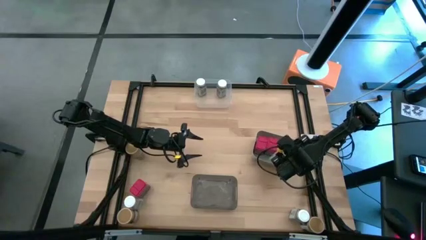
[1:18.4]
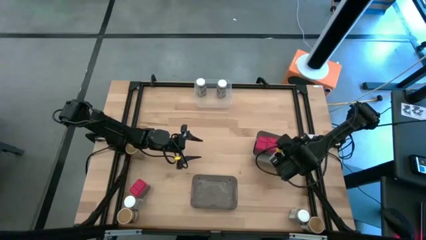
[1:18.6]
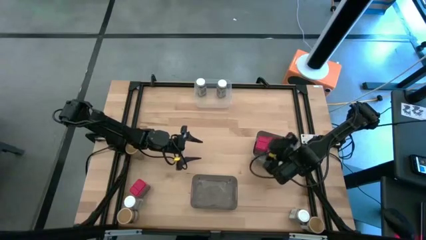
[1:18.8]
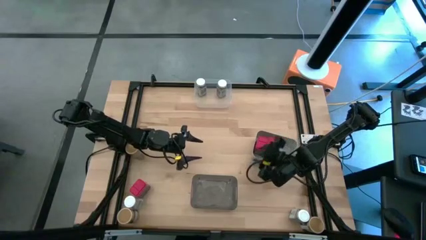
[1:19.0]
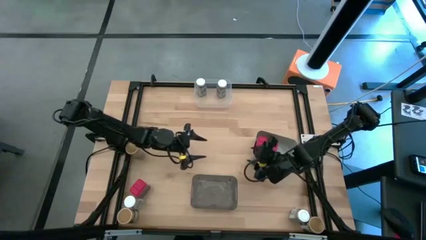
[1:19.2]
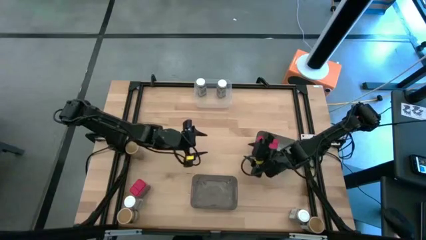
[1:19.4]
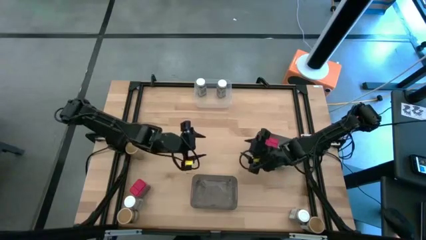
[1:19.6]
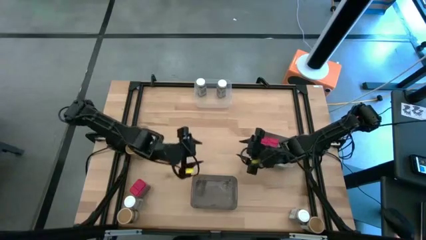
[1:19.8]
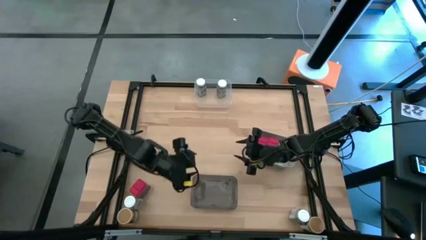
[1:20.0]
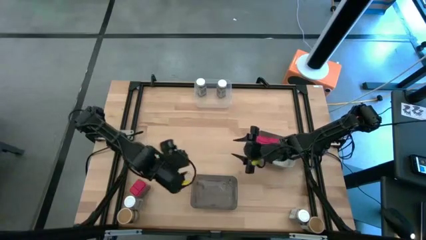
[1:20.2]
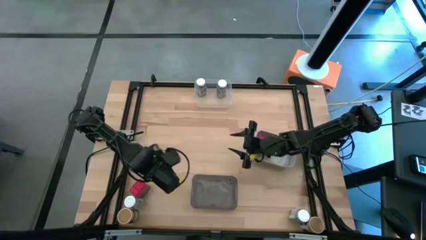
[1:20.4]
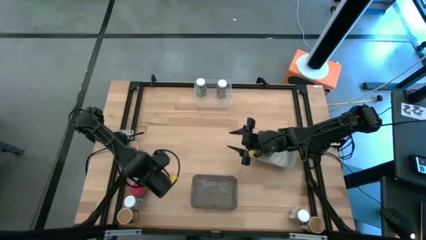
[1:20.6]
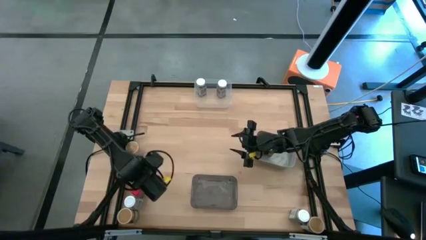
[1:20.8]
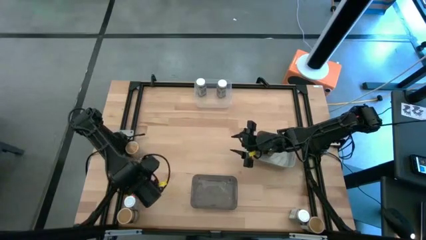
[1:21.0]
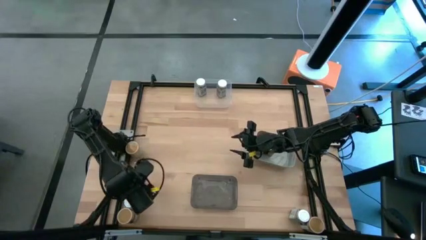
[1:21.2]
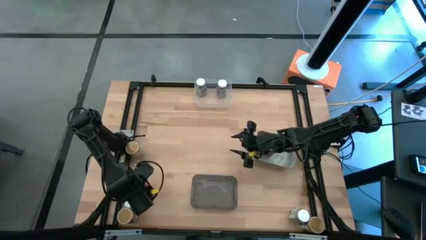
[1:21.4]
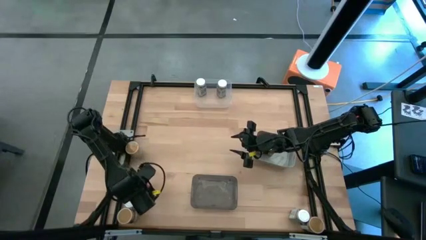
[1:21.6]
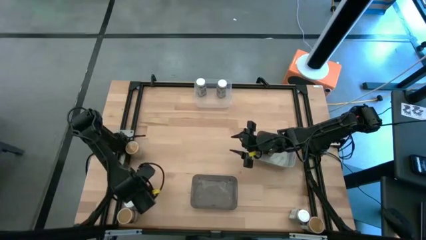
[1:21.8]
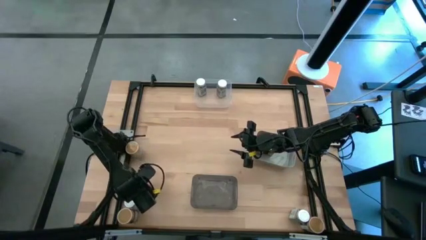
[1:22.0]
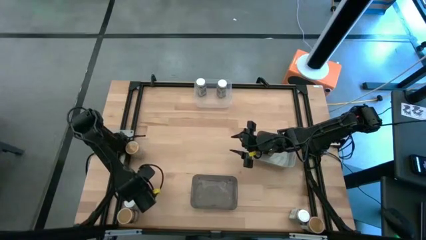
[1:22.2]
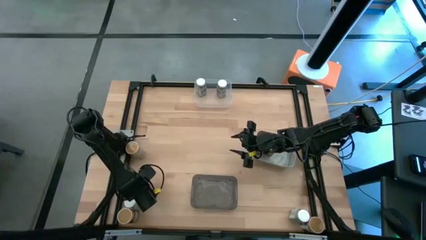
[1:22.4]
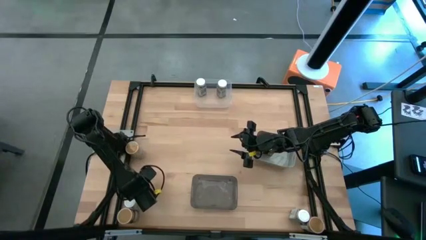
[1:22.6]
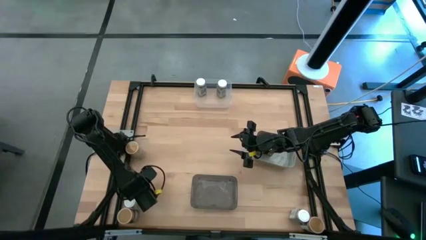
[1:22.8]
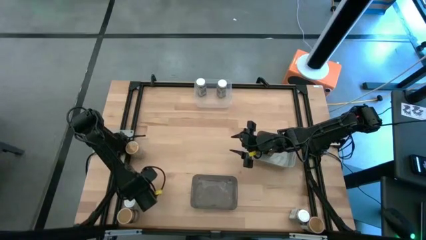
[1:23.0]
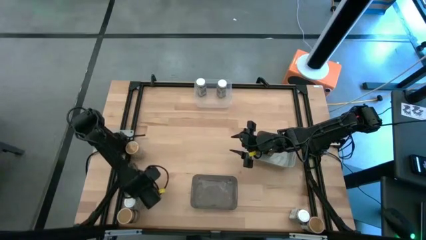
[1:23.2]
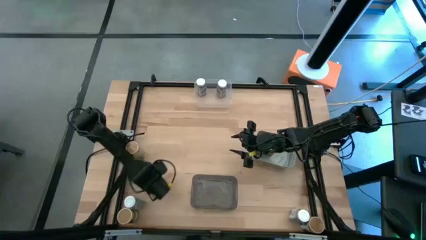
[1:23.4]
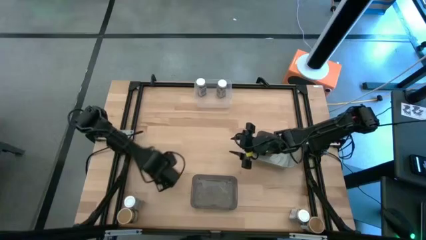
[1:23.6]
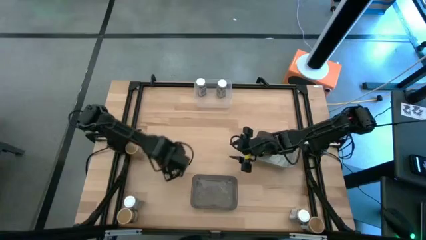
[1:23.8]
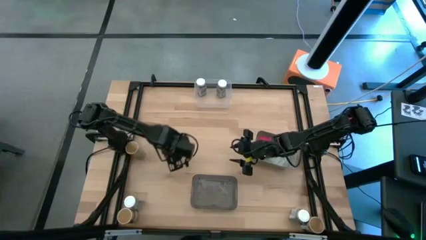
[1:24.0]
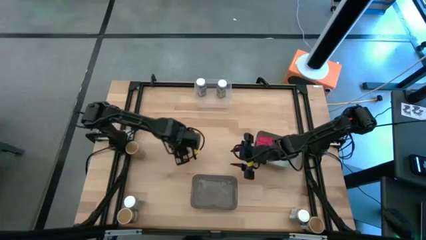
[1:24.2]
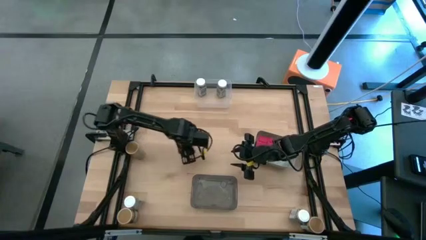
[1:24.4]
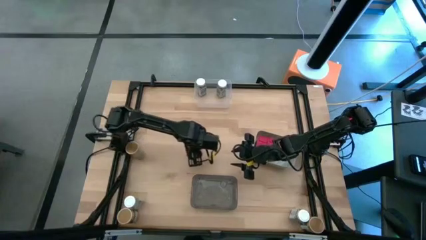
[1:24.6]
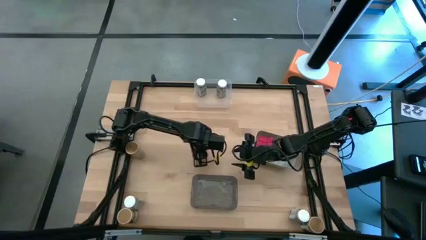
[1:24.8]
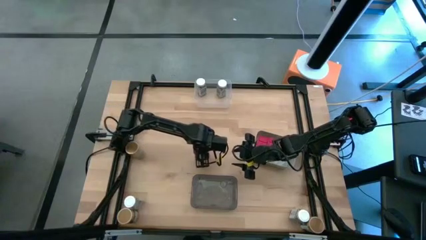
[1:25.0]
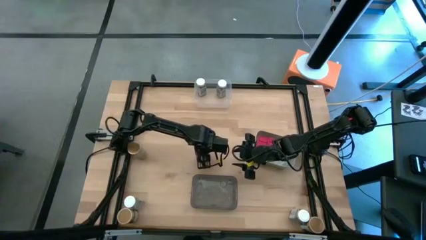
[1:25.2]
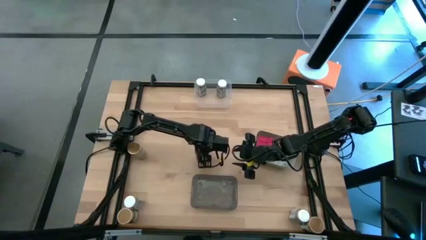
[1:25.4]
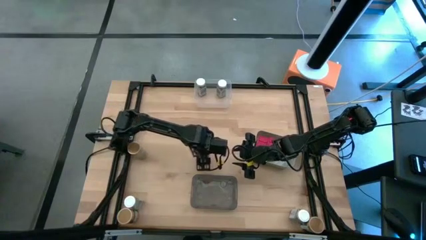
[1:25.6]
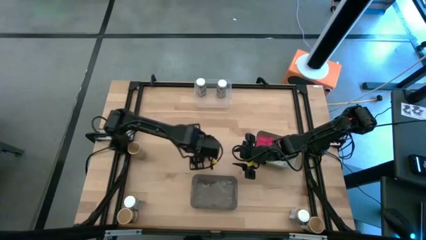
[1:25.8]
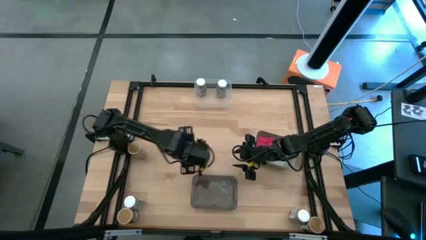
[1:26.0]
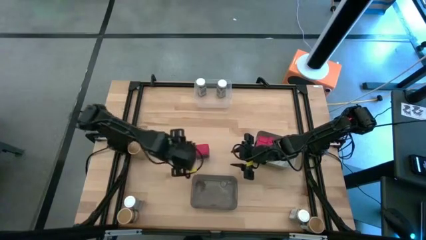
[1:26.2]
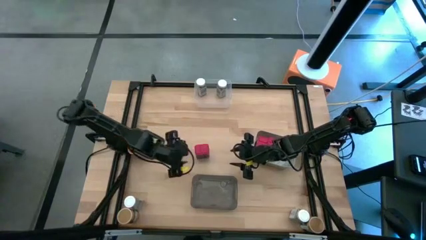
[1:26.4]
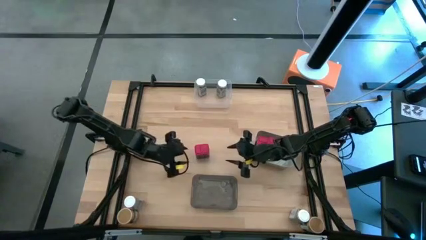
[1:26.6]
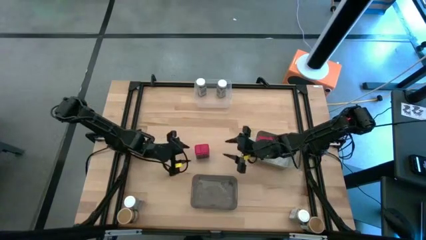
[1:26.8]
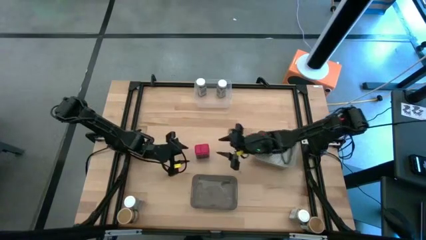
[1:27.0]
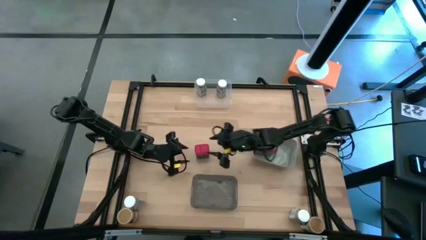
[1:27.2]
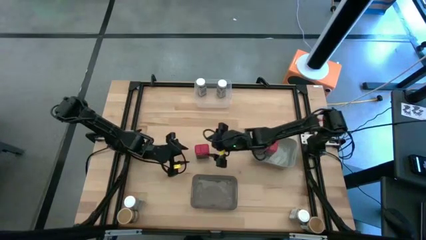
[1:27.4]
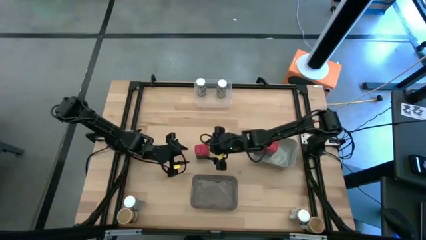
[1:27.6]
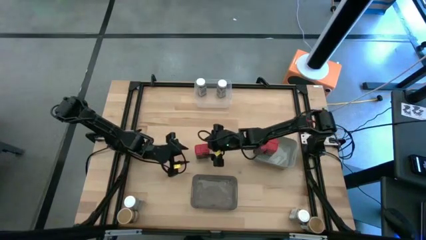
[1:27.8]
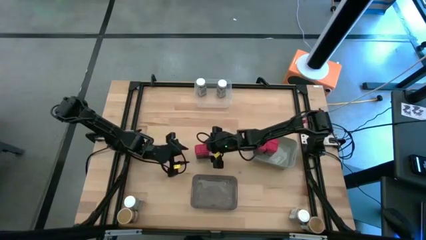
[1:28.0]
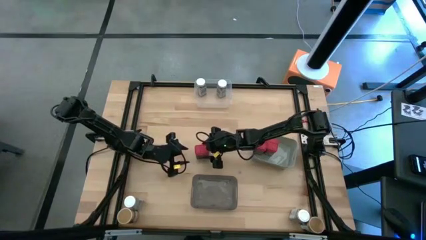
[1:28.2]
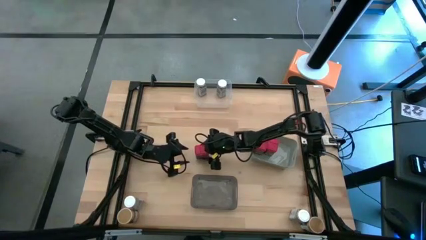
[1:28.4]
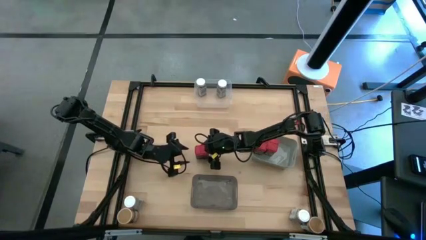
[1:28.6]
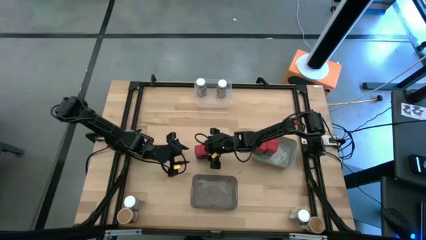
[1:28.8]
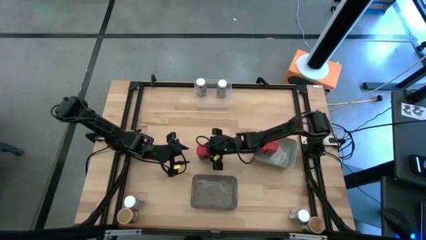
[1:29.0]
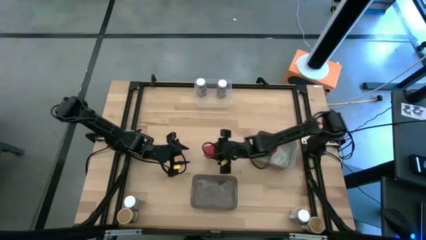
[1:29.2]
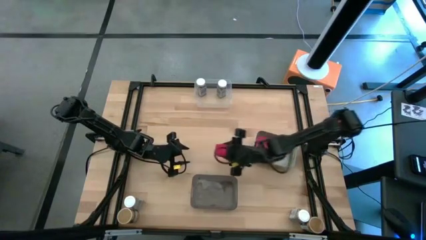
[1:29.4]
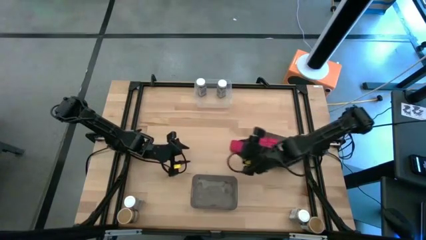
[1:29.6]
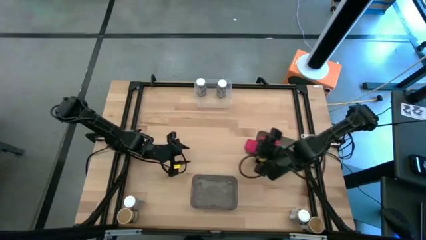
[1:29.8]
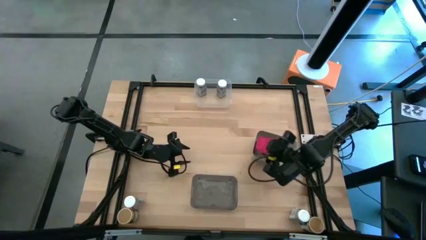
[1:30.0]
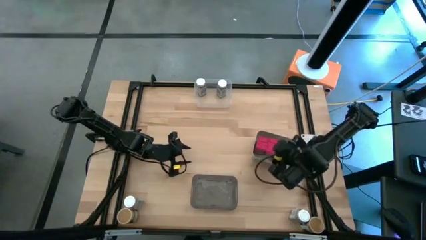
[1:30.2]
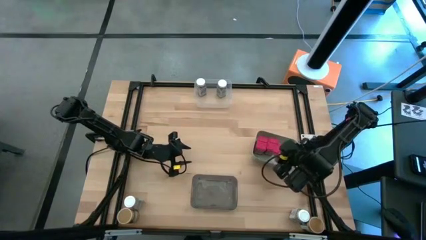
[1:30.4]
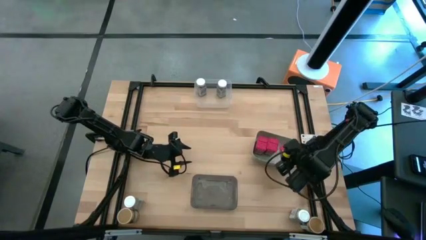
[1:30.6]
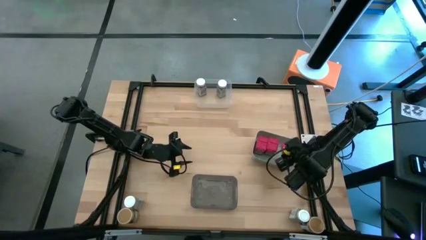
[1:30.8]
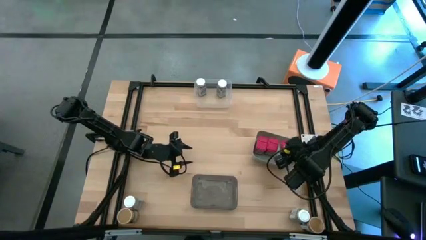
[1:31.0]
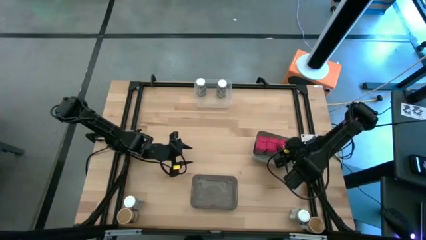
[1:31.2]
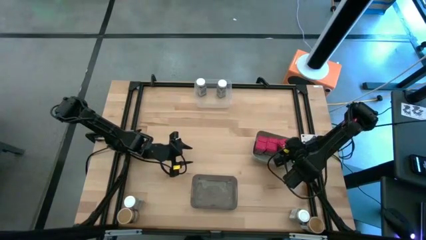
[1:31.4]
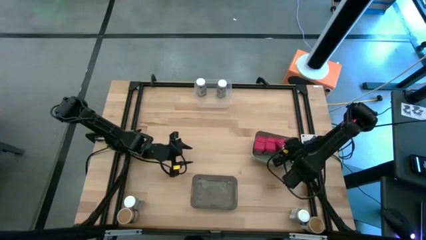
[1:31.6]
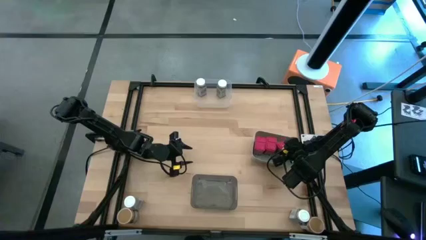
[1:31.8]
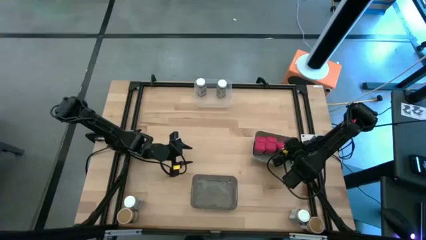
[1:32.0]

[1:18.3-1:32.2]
Task: Sort spices by type
Put the red seasoning can into the gray bin

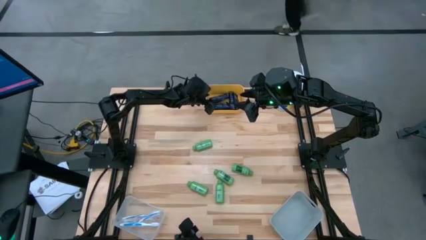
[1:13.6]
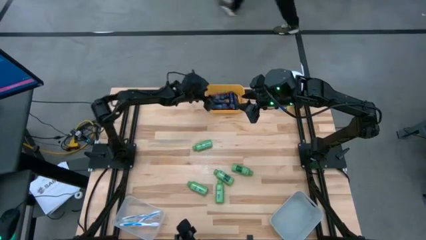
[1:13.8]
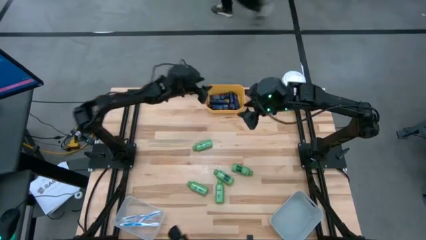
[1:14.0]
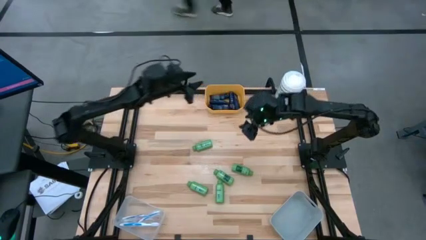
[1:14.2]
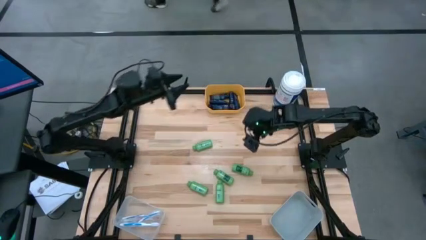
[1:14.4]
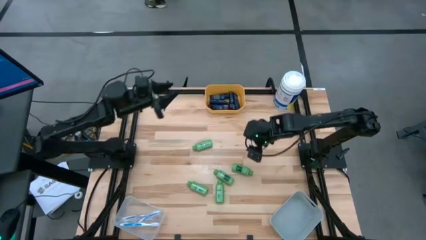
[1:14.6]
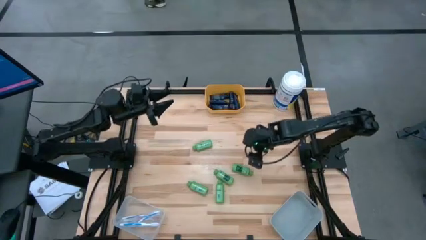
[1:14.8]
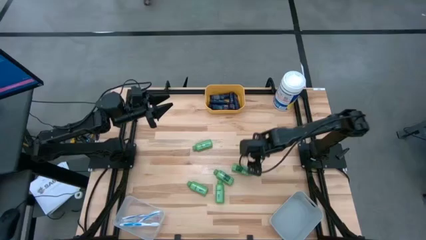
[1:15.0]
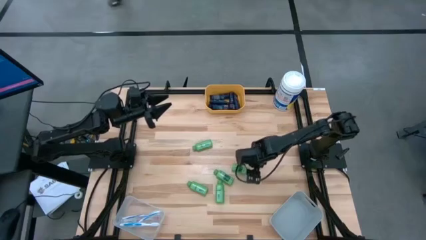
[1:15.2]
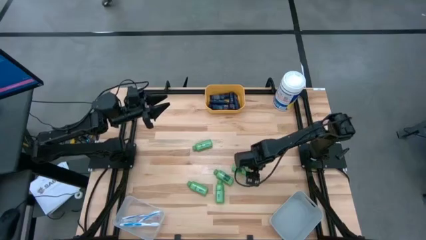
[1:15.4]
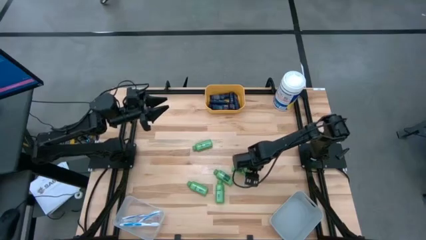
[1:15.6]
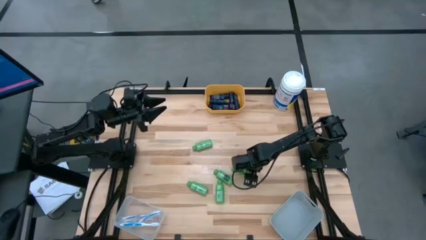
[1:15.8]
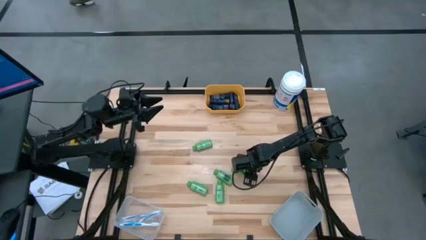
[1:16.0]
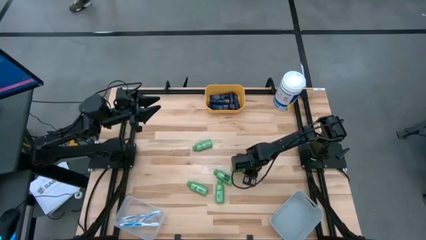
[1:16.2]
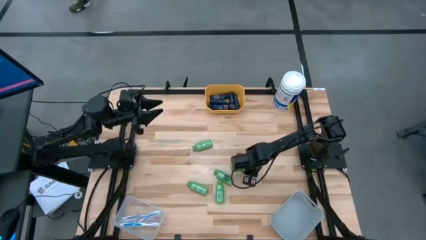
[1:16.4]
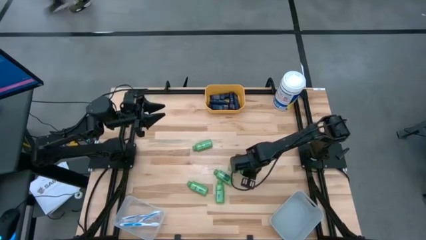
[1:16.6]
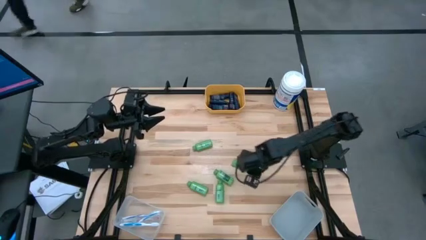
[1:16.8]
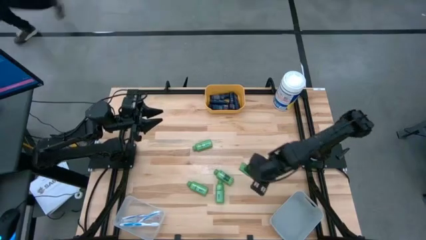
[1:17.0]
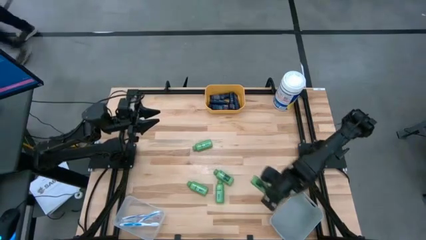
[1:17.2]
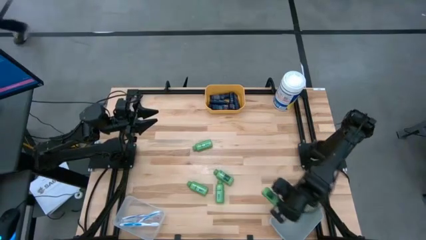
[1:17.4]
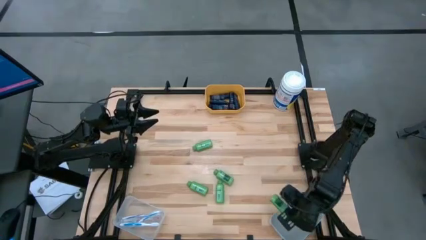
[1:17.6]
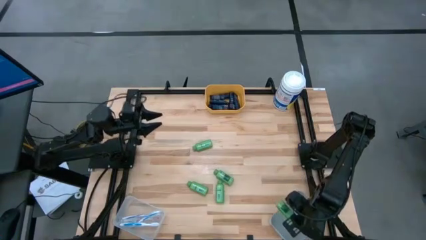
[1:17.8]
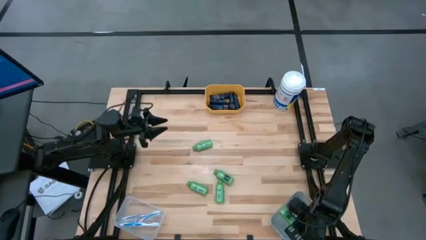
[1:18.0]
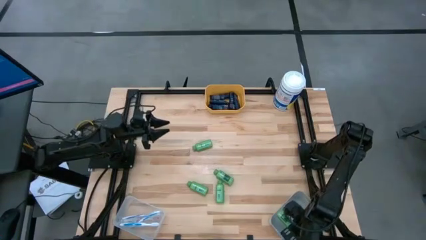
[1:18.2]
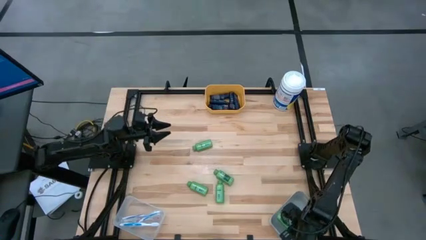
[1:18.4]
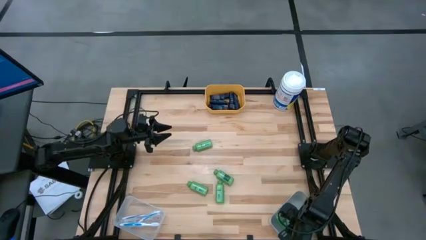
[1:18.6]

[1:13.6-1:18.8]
Task: Pick & Place Travel size toiletries
Put the shampoo into the white bin
